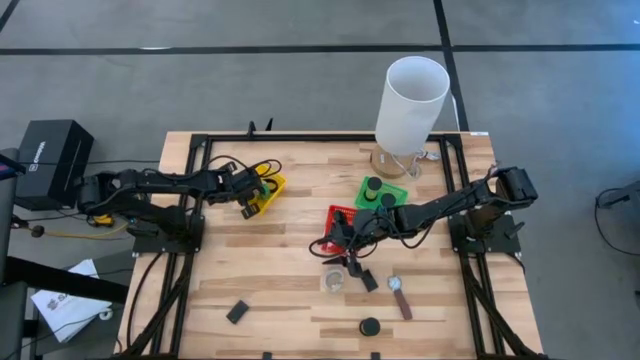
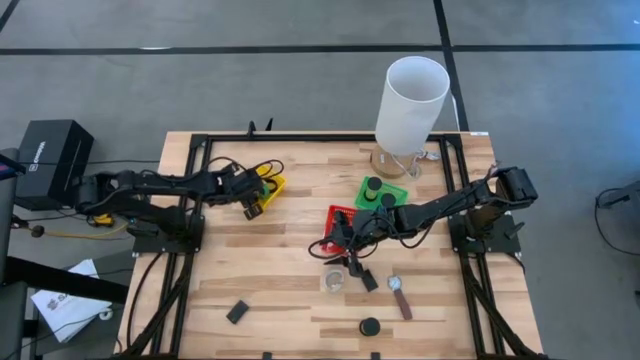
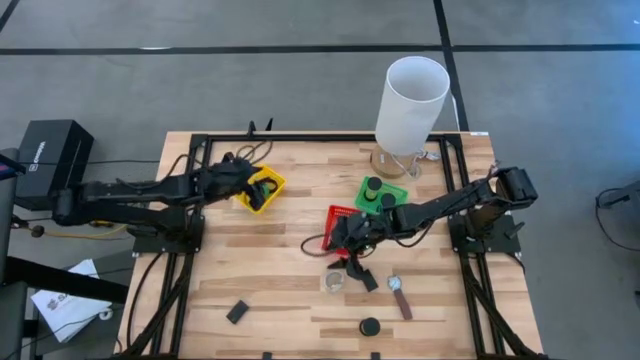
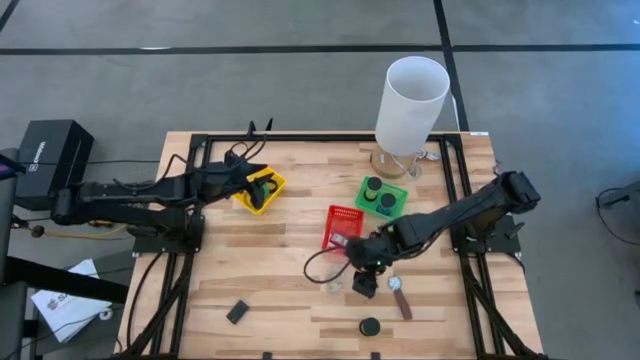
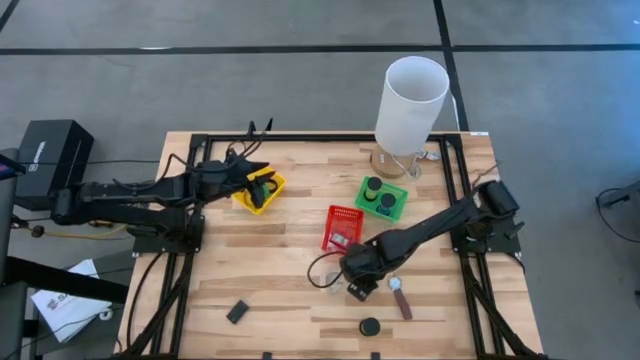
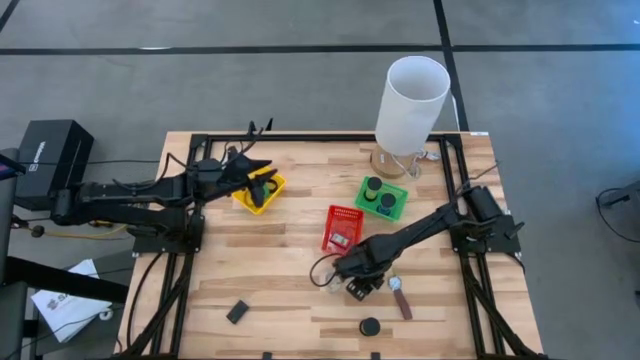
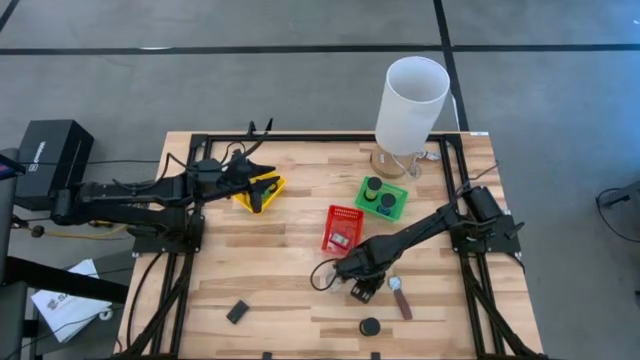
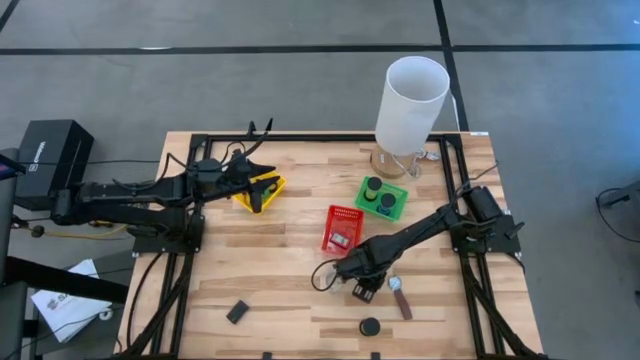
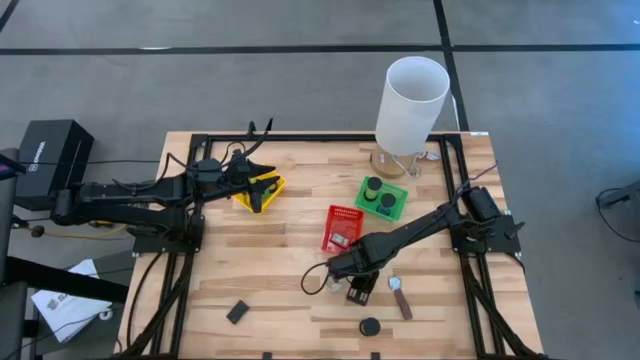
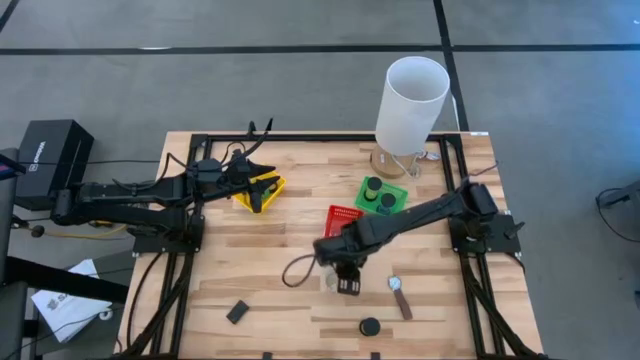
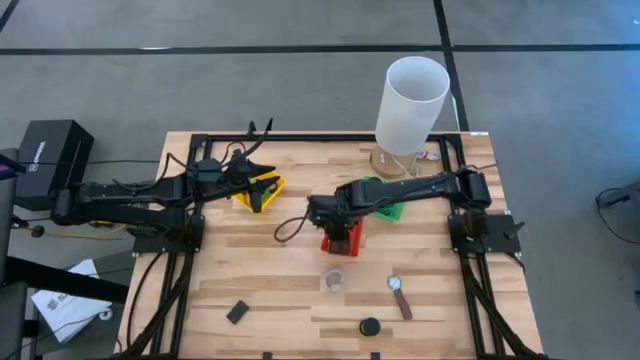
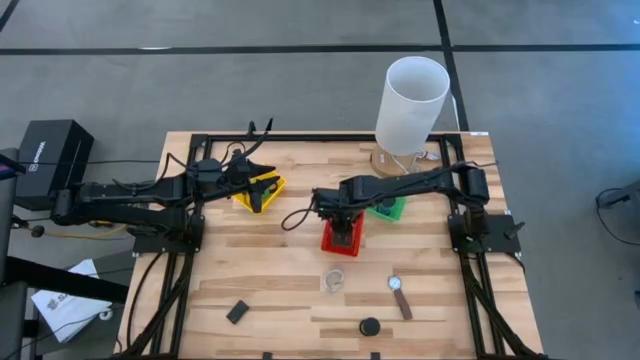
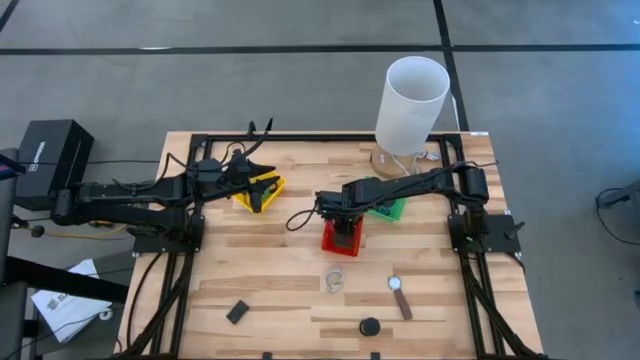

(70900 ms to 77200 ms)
Task: Pick & Place Office items
Put the right black digital clock into the red bin

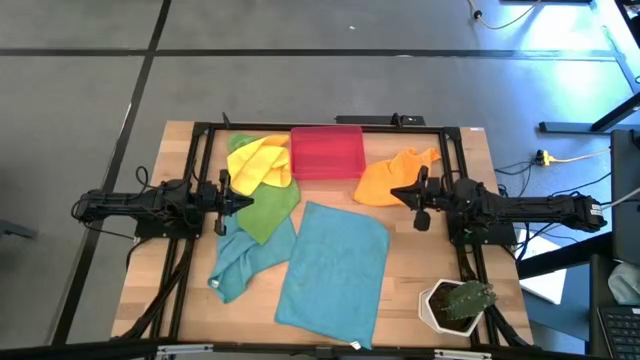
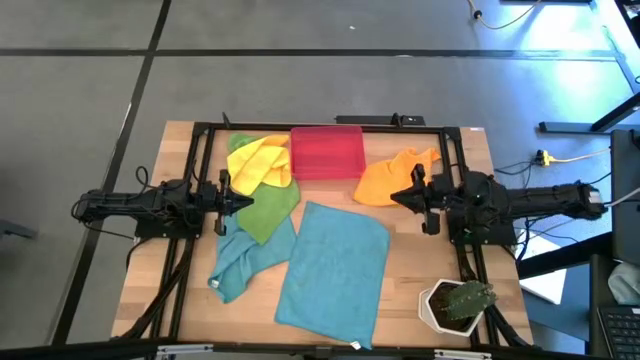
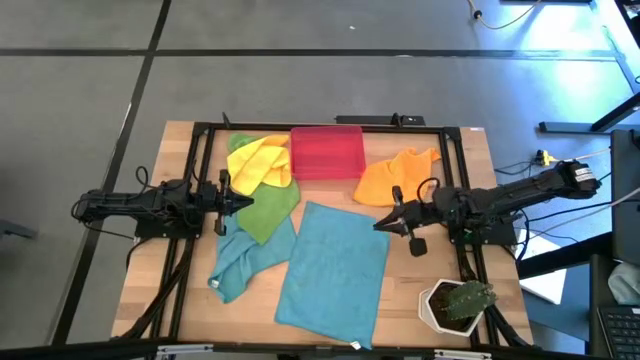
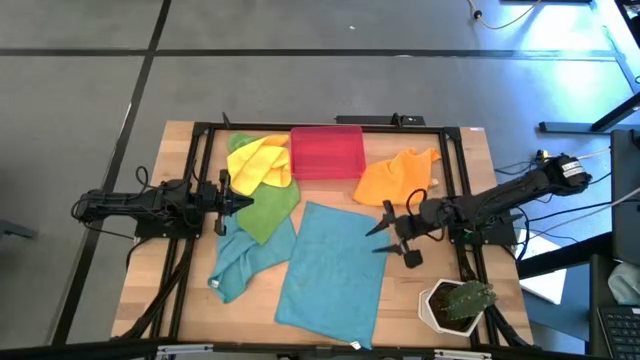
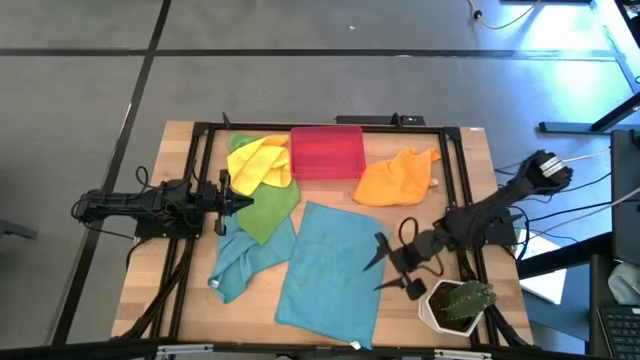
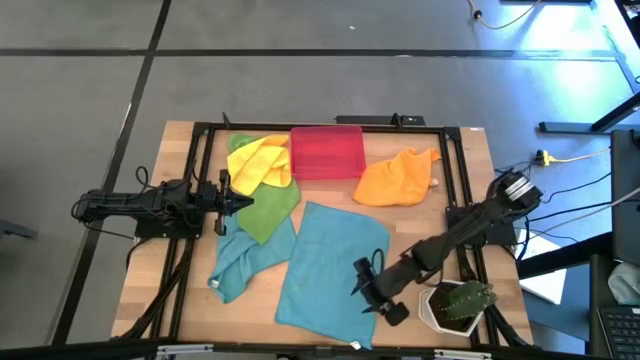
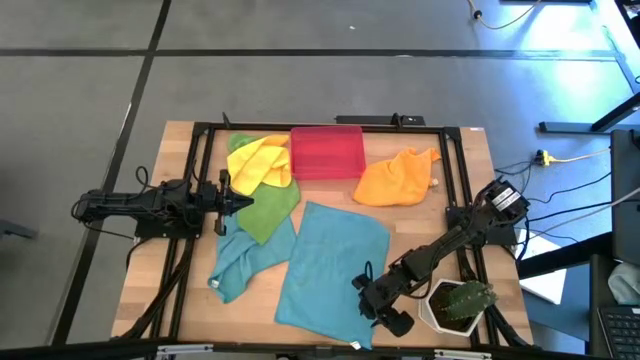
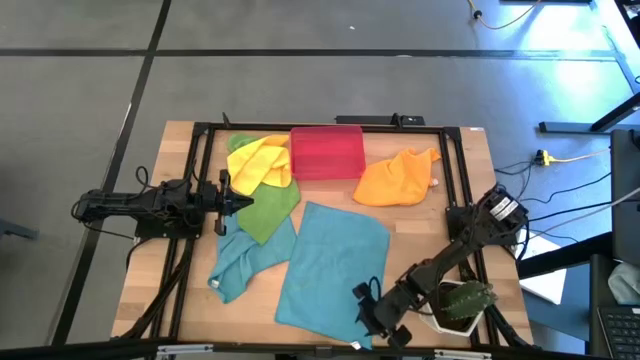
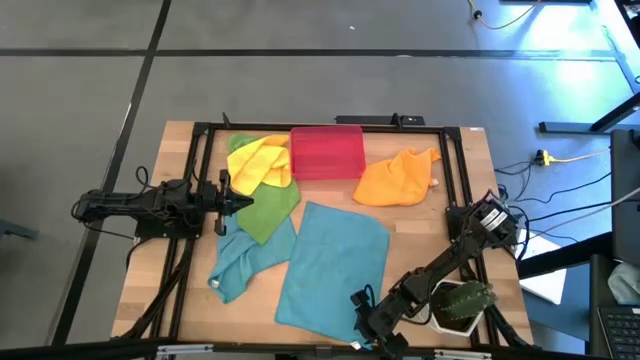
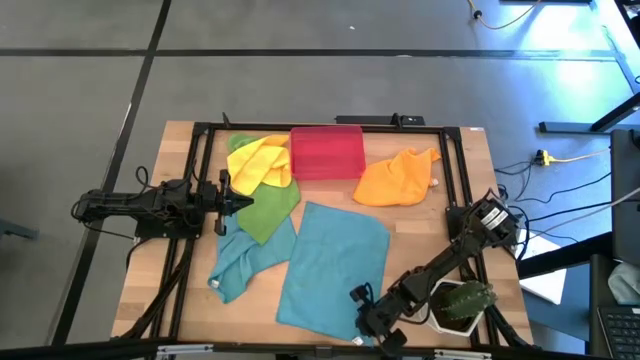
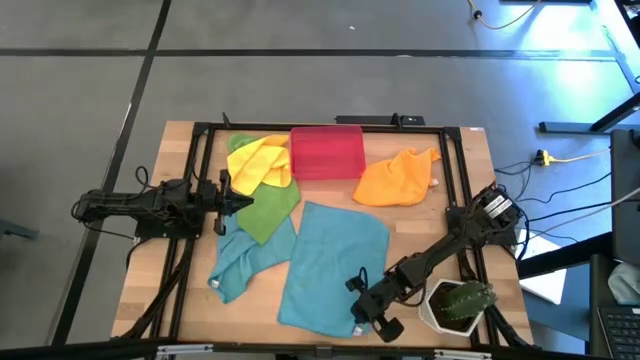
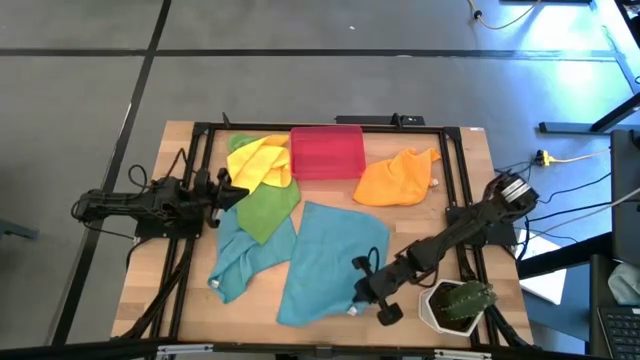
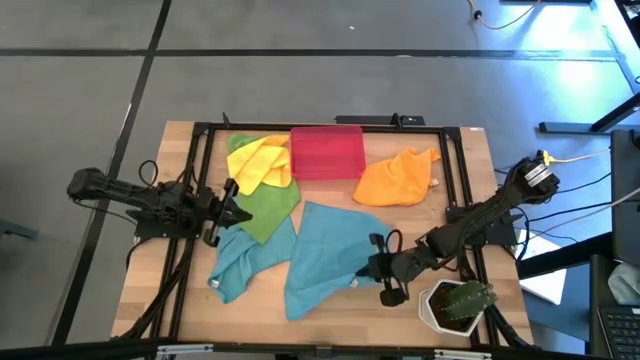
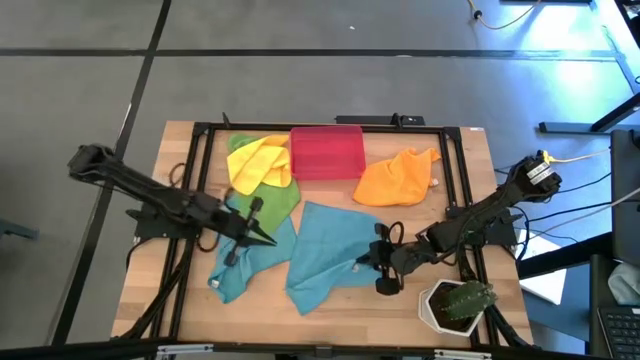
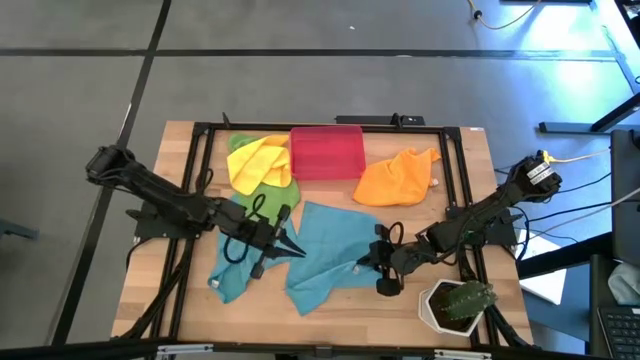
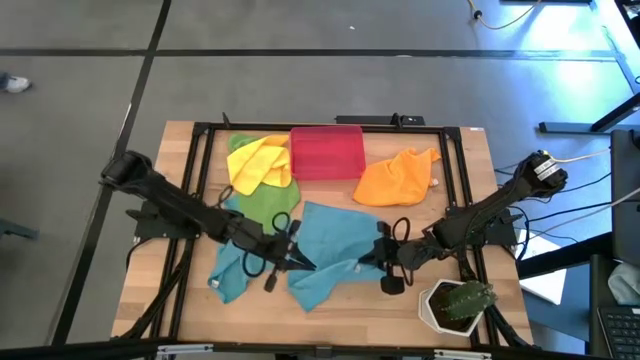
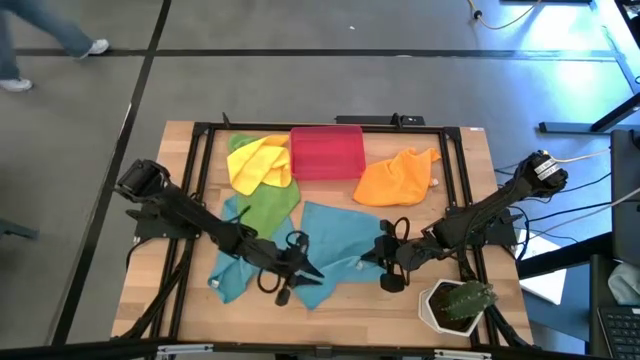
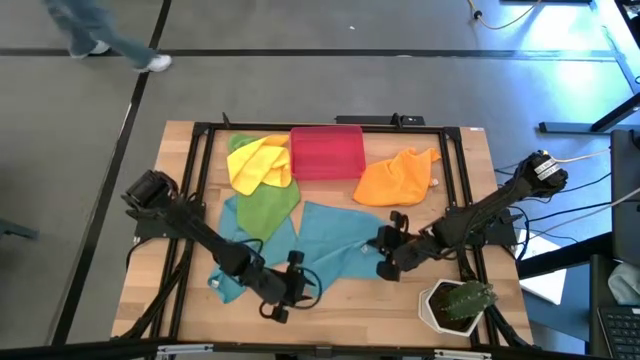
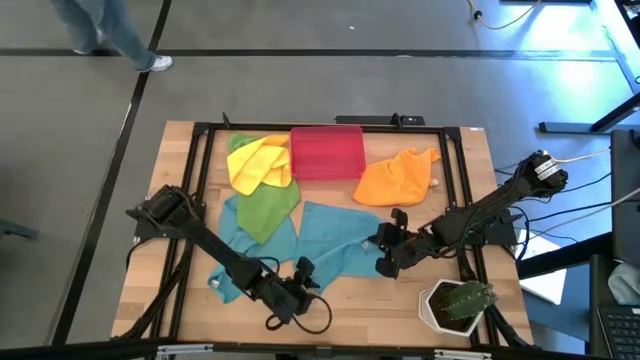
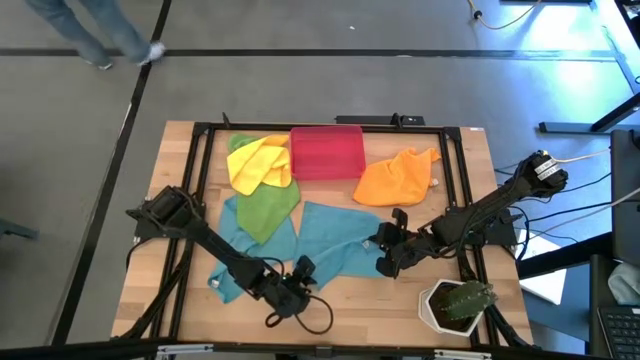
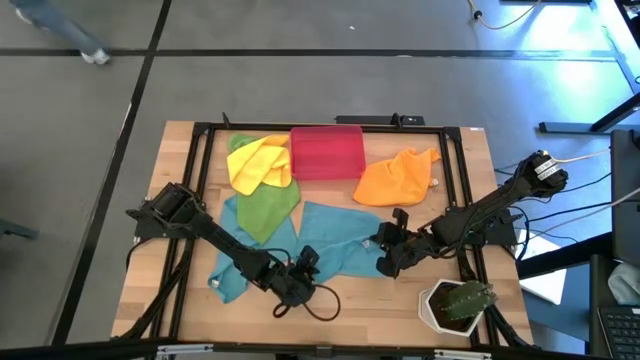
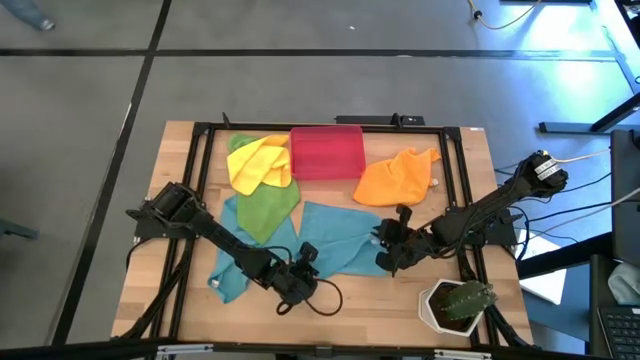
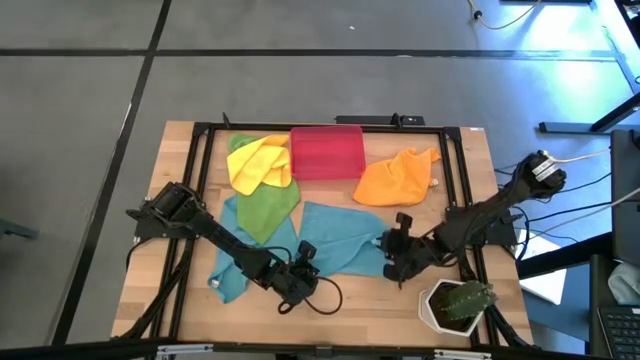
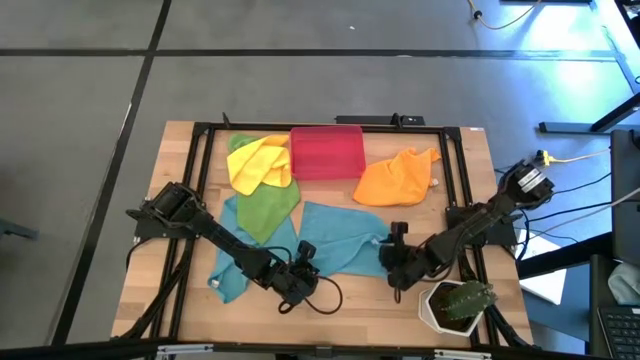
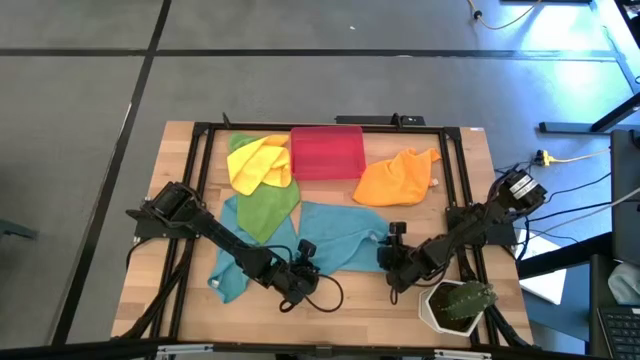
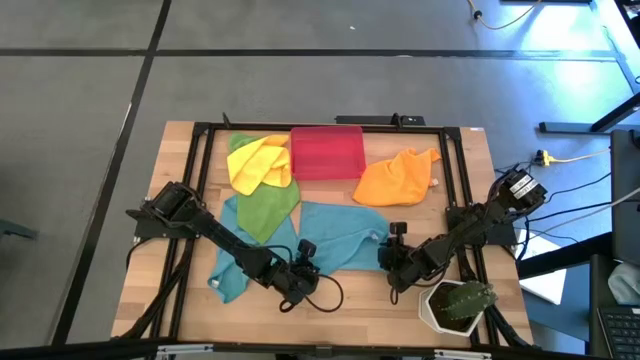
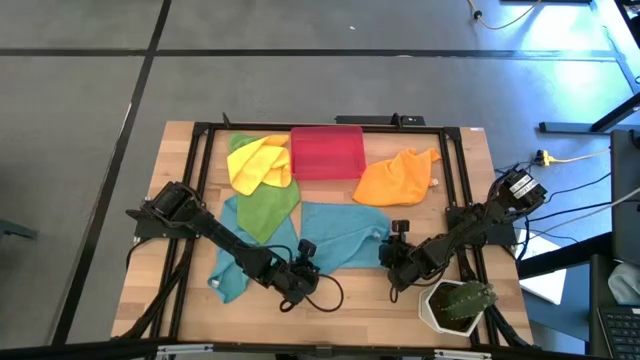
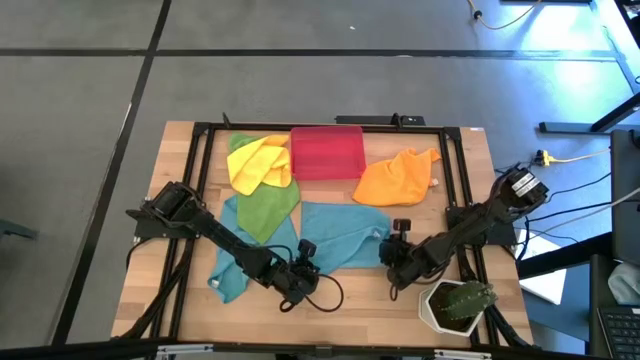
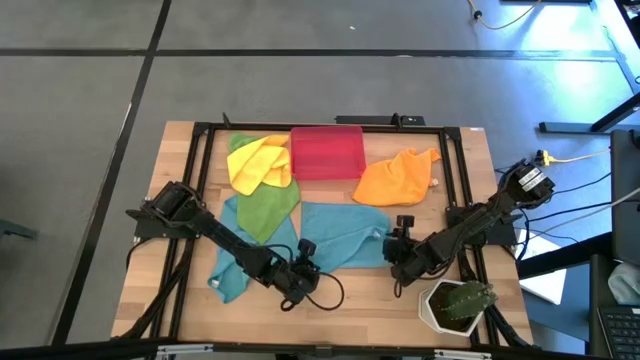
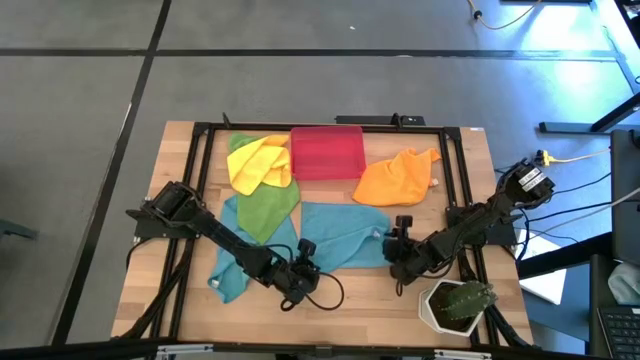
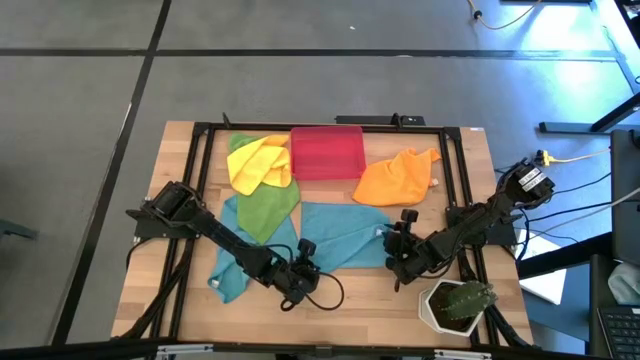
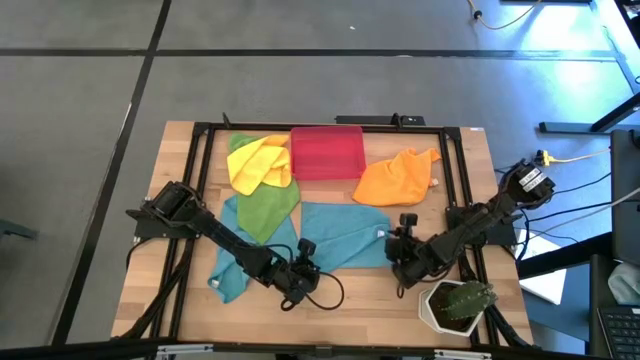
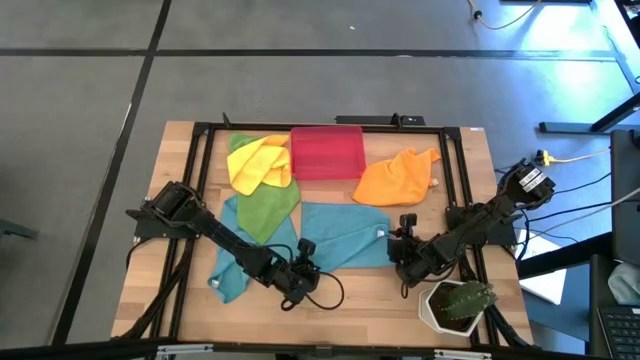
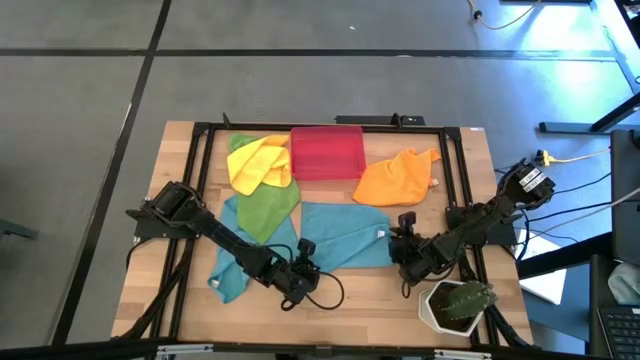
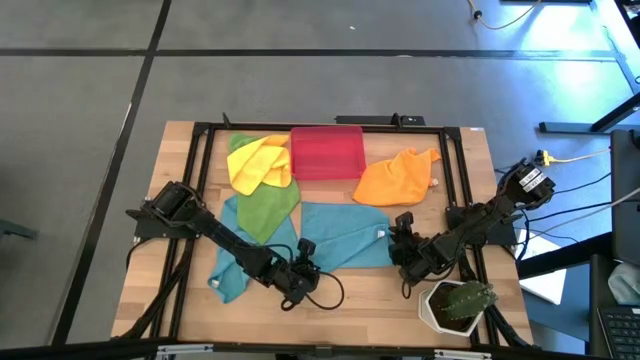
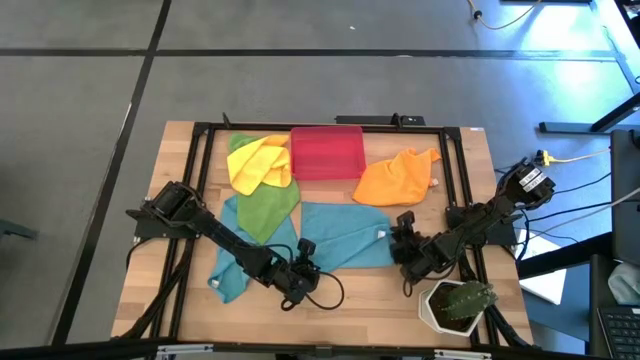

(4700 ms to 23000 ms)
Task: Roll microfiber towels into tight, uniform cylinder then place into a basket
Fold the right blue microfiber towel
